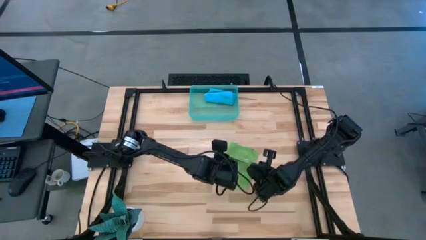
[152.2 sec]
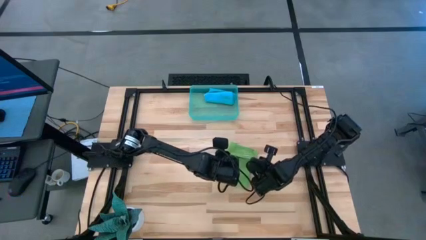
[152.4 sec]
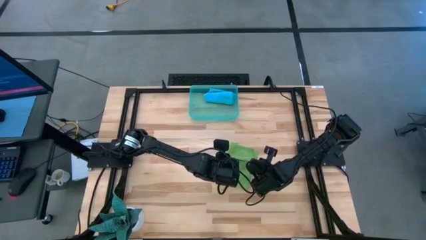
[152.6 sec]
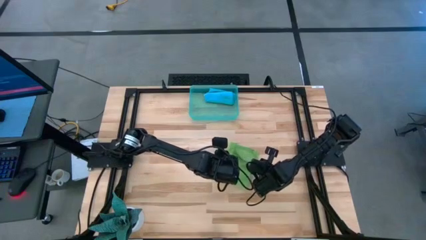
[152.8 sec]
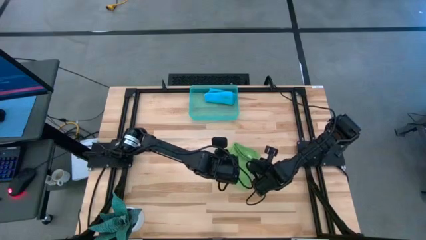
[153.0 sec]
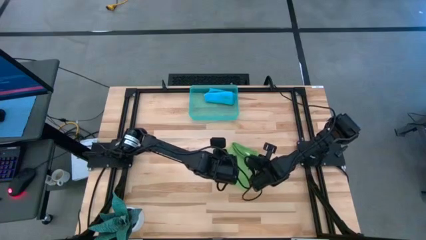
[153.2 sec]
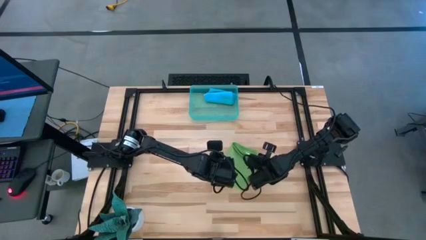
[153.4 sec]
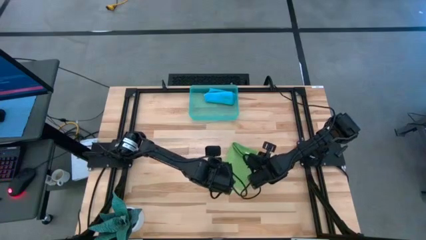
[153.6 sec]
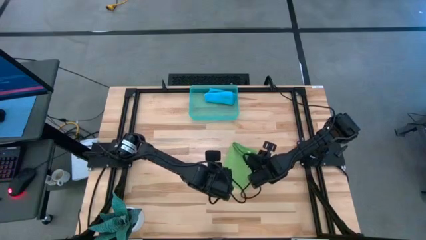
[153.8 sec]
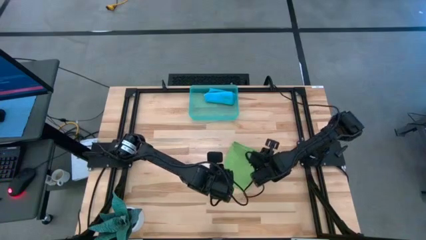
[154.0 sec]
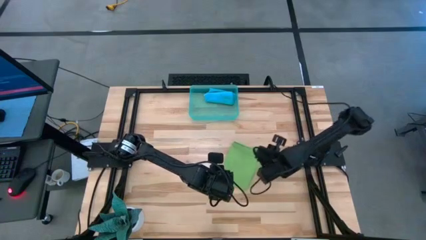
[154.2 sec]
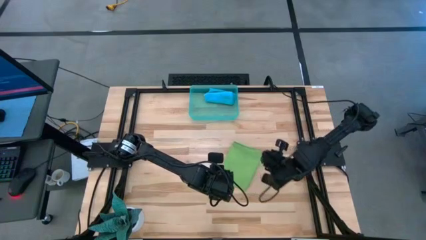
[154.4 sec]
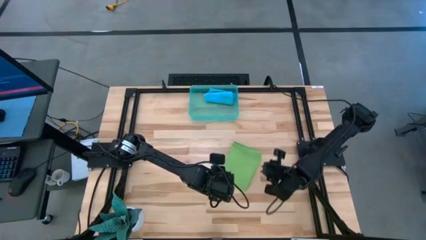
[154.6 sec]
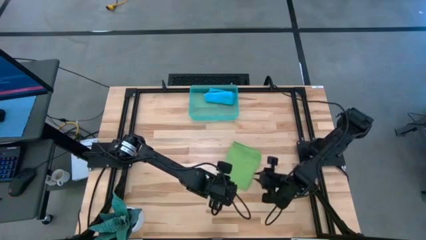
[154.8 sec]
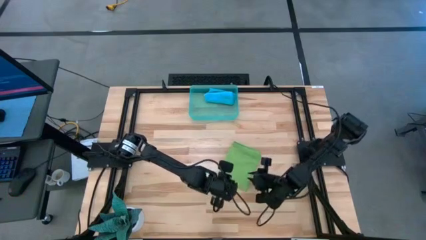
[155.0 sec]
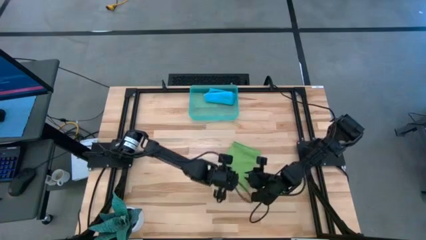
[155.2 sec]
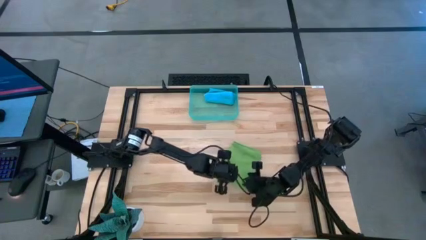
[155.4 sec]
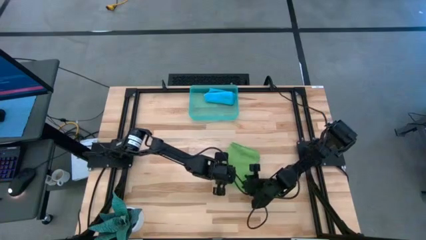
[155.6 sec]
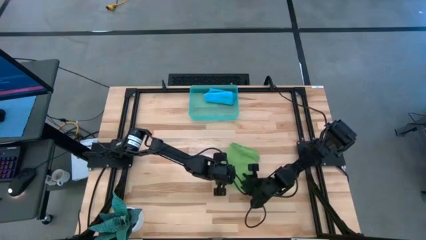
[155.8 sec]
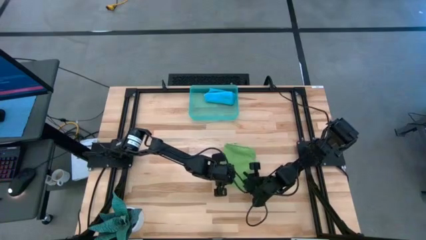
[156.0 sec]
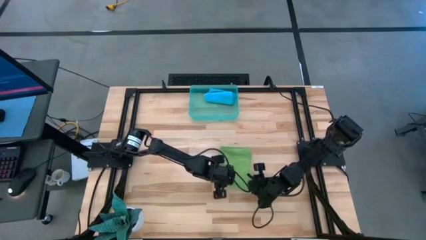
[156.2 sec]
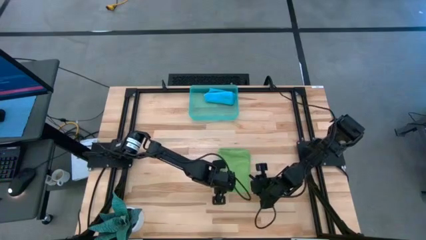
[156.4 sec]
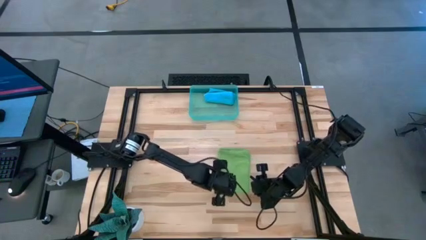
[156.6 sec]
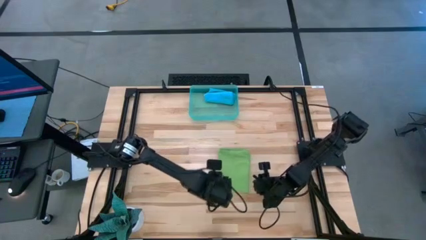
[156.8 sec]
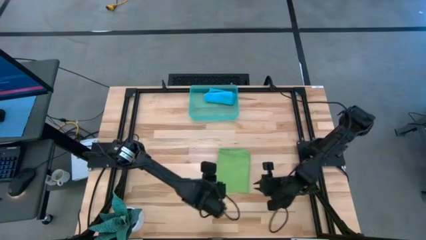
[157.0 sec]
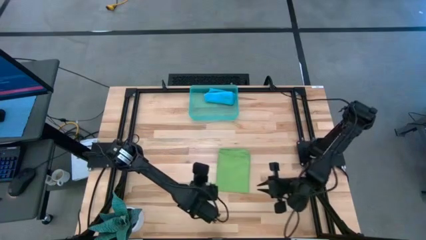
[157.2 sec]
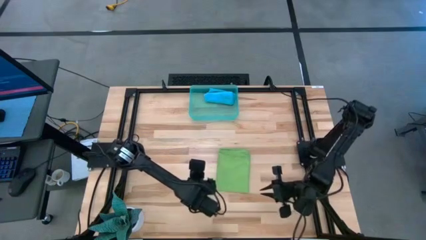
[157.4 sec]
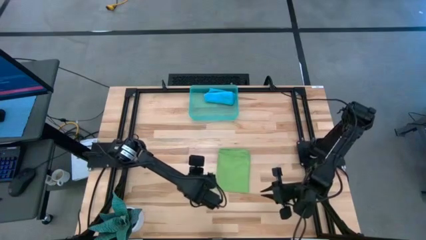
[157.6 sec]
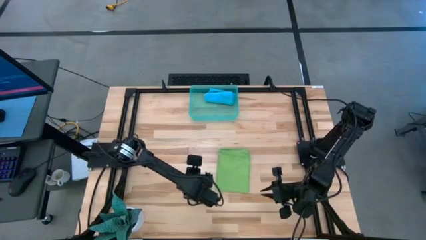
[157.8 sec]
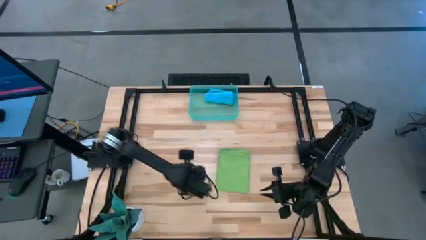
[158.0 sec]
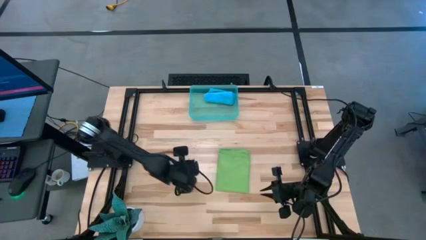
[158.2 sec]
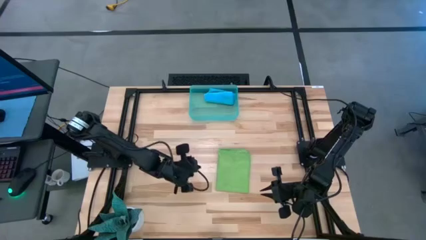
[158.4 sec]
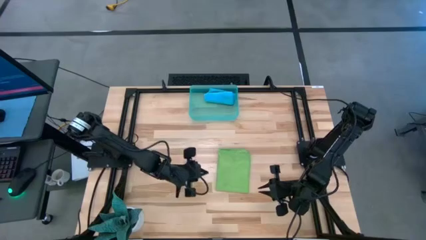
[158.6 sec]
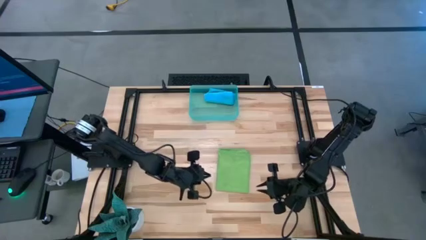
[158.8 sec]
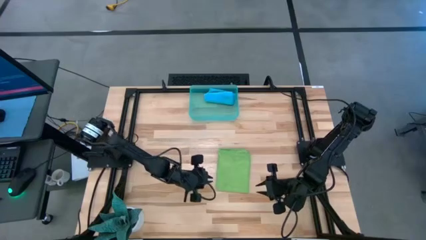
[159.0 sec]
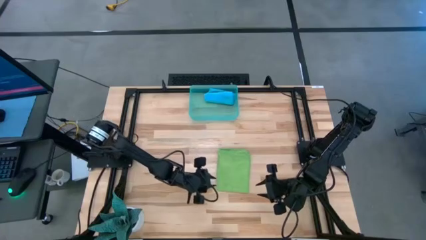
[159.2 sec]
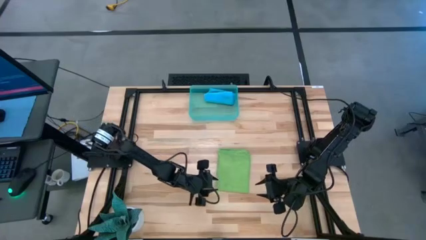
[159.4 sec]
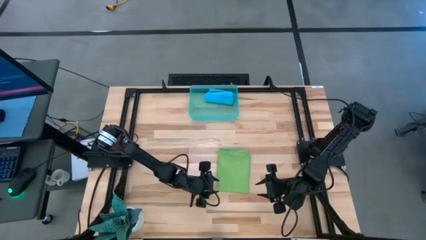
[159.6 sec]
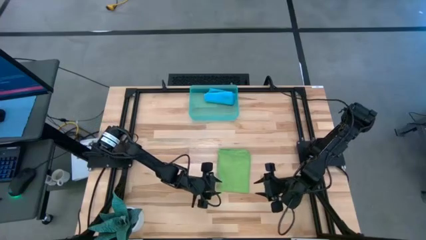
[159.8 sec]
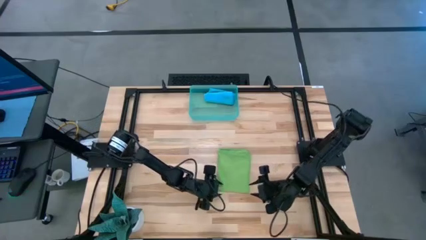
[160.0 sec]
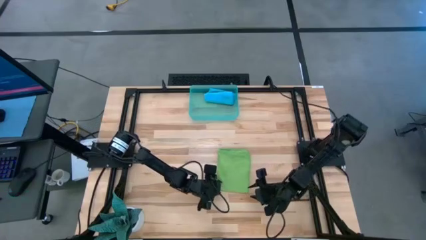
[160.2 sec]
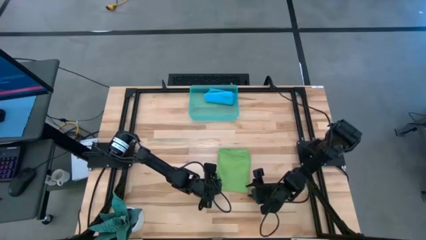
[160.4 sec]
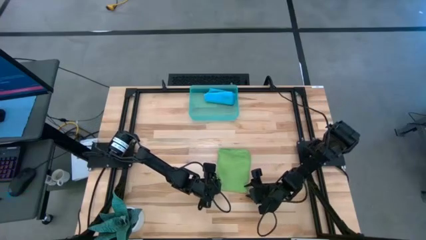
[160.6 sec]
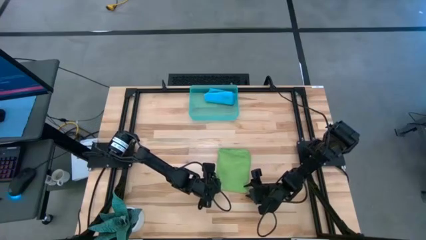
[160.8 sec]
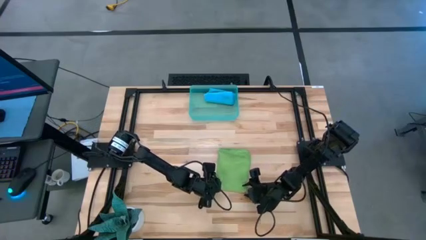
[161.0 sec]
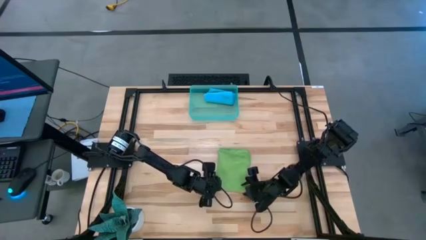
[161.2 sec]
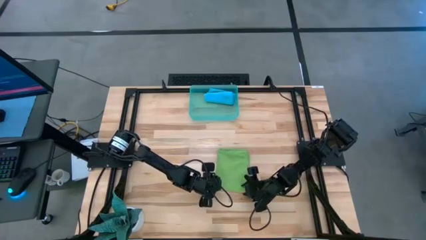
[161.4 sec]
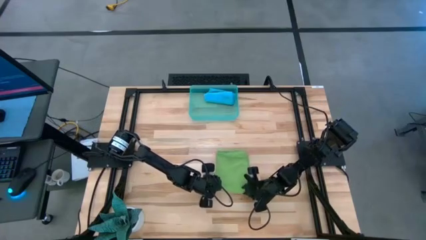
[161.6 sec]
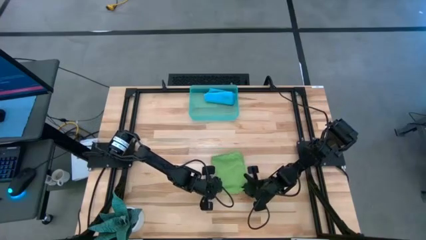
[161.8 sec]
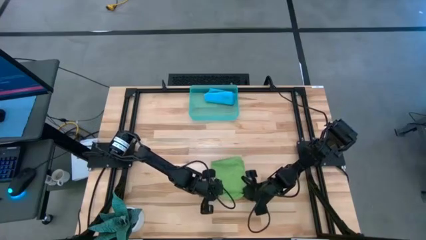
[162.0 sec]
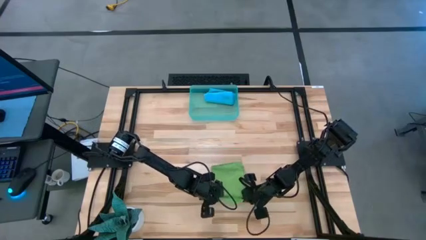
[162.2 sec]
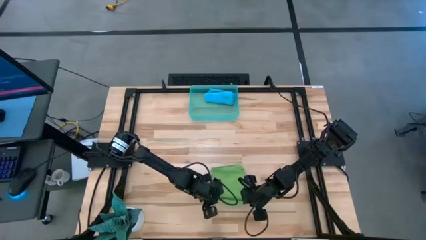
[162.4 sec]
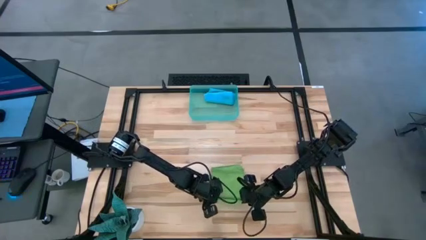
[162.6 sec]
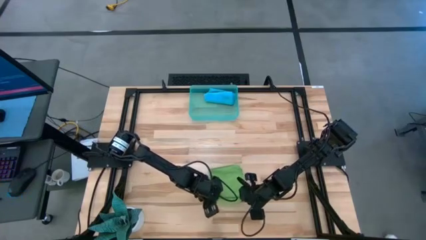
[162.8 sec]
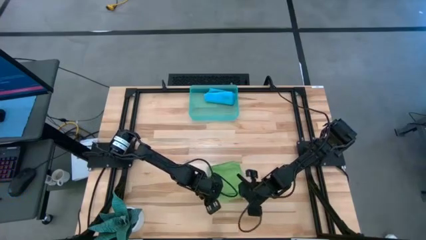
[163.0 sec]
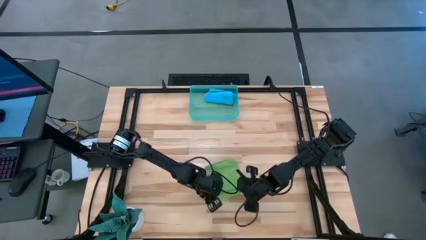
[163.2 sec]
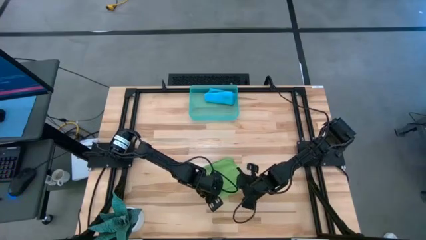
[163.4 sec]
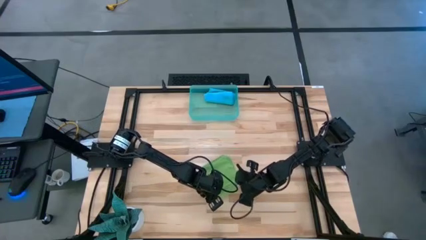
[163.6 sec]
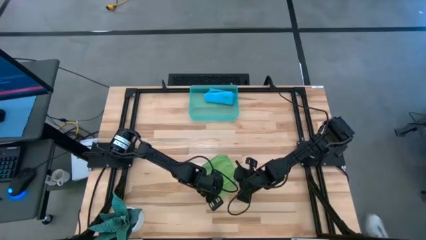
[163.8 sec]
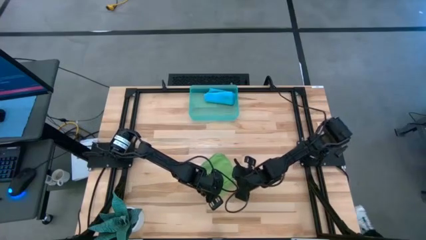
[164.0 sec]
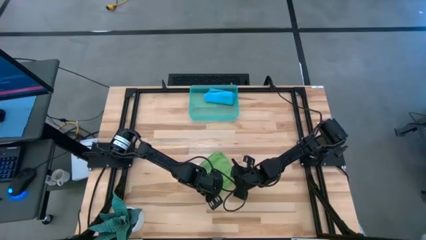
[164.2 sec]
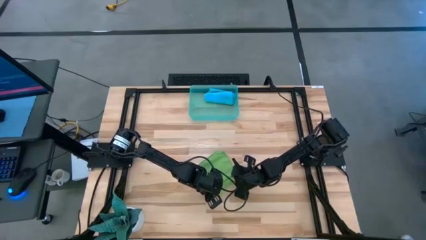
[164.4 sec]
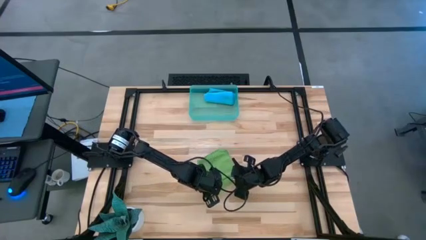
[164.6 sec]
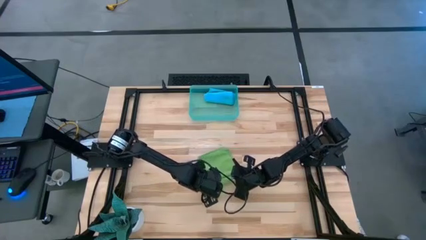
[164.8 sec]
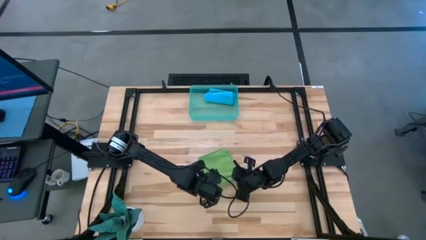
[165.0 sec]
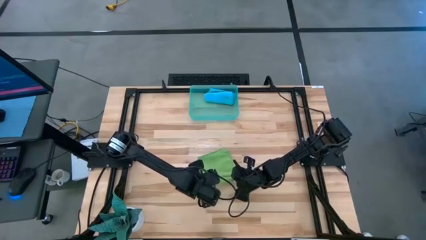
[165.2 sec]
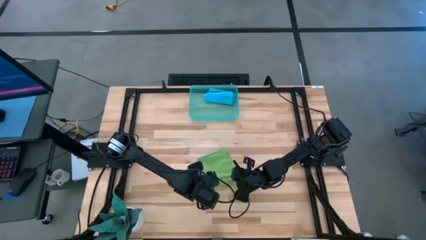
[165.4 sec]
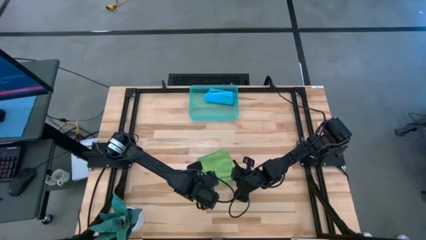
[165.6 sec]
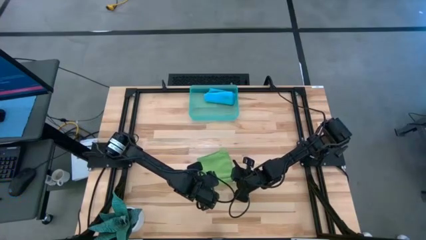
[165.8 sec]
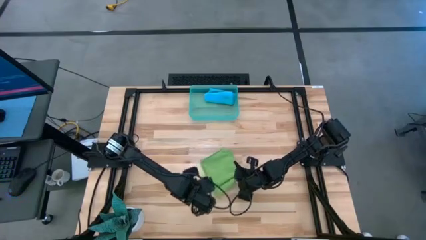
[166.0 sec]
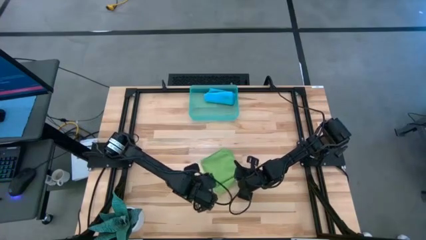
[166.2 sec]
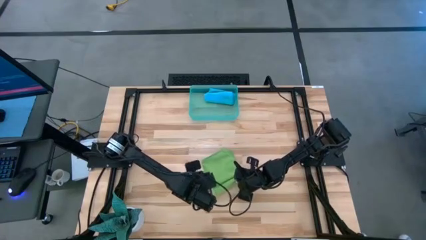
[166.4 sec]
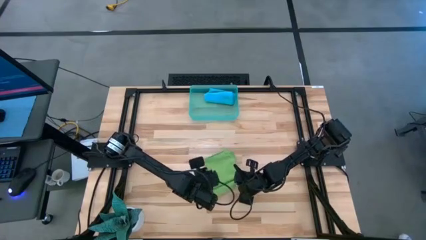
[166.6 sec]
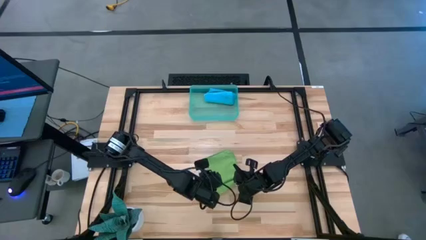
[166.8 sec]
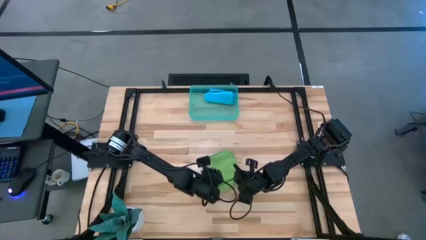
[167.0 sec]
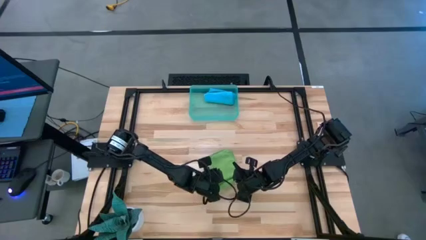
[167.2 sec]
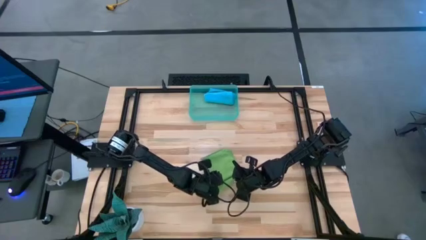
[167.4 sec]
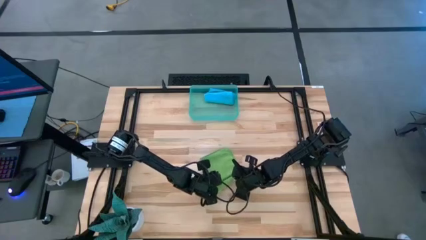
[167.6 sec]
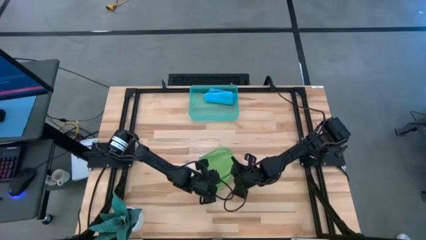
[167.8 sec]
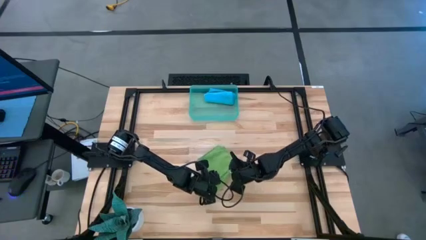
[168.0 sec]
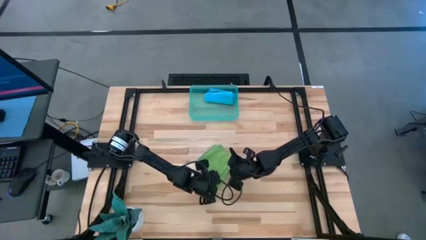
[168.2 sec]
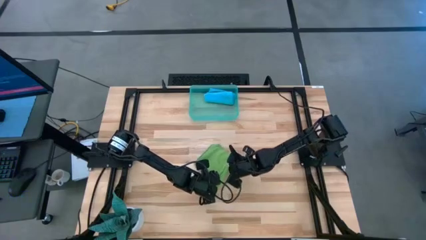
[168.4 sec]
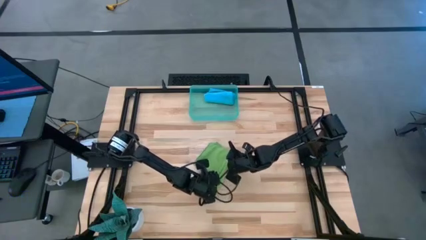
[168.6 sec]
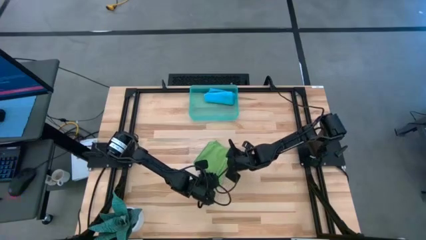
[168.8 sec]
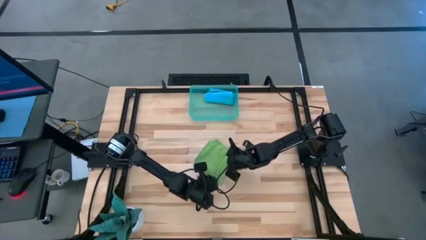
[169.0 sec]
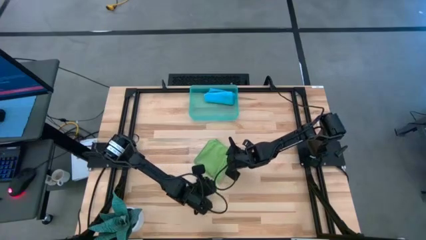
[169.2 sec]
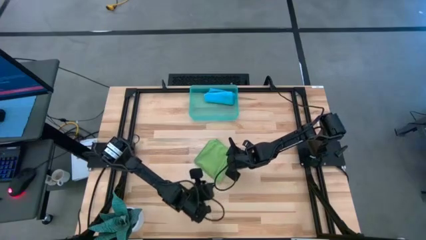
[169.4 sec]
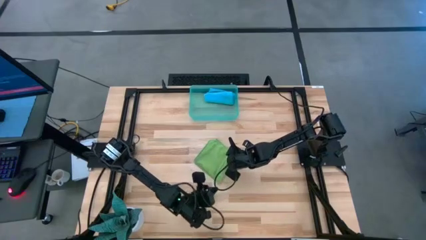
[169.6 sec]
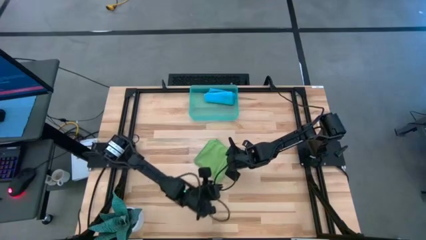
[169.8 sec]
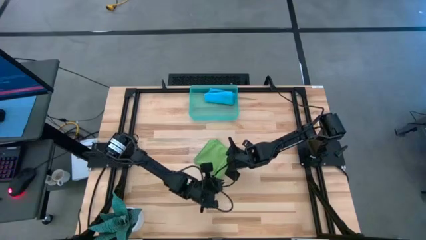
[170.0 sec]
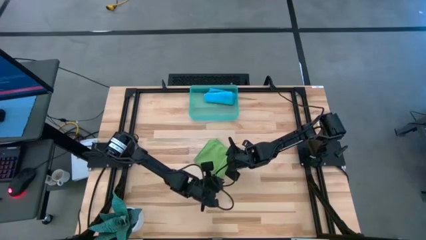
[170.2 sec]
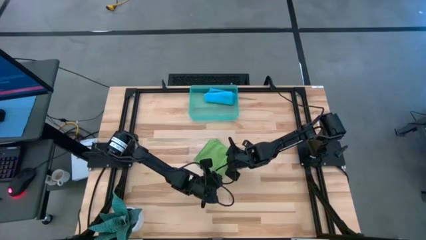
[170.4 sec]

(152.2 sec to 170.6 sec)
Task: Roll microfiber towels into tight, uniform cylinder then place into a basket
Roll the green microfiber cloth
